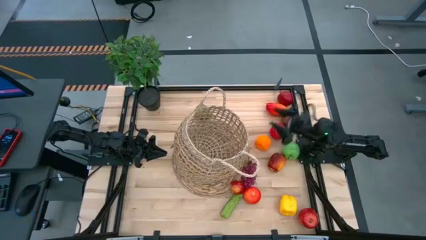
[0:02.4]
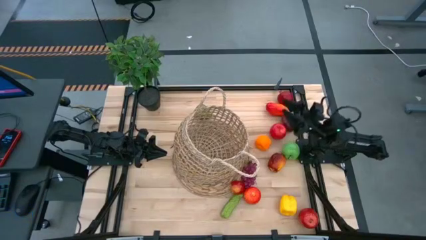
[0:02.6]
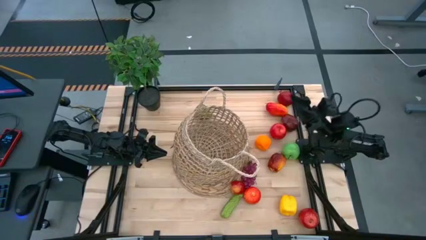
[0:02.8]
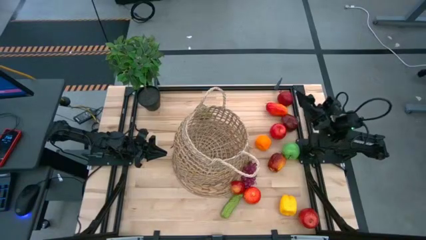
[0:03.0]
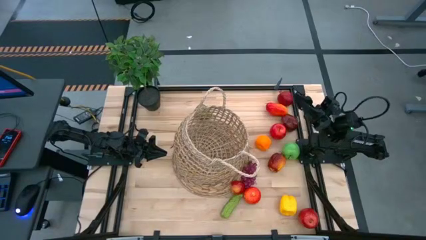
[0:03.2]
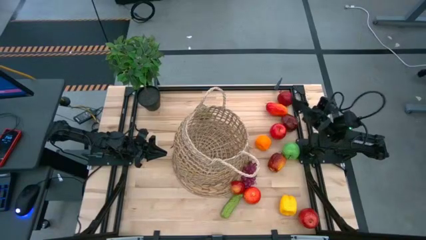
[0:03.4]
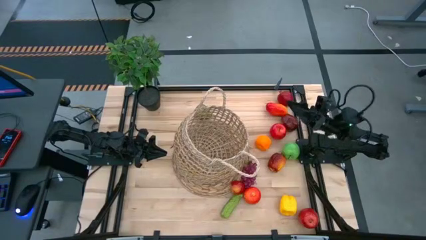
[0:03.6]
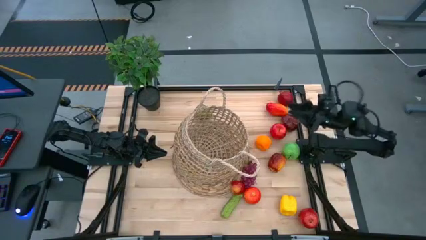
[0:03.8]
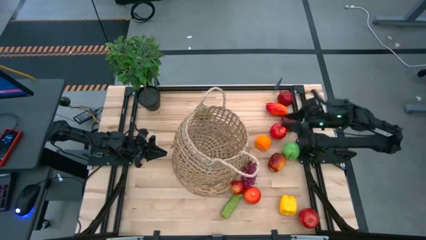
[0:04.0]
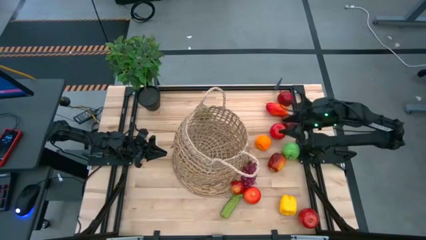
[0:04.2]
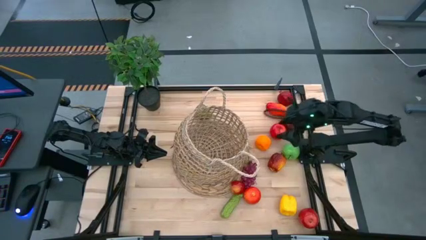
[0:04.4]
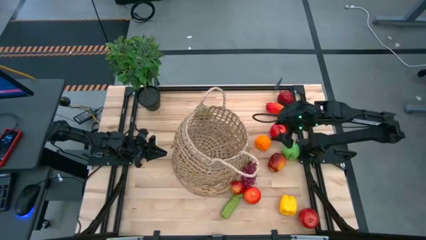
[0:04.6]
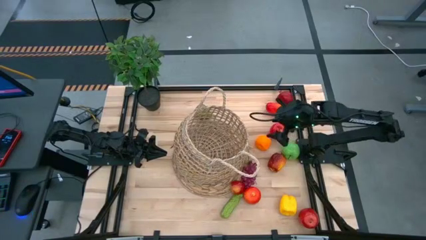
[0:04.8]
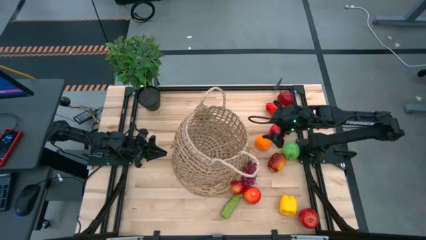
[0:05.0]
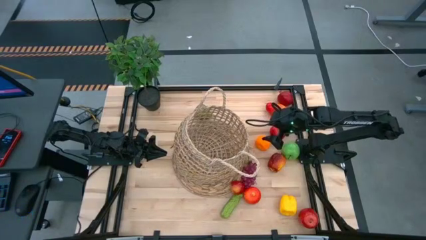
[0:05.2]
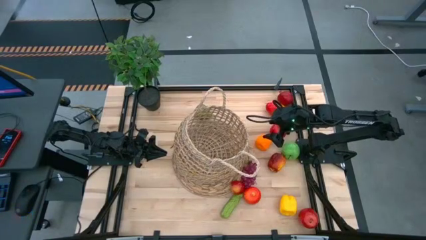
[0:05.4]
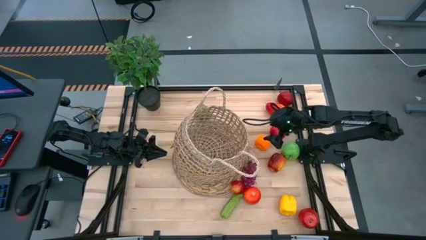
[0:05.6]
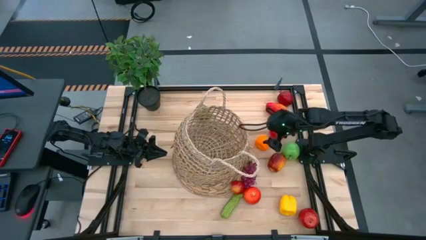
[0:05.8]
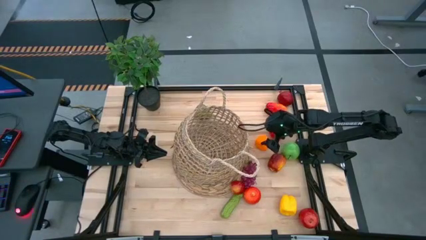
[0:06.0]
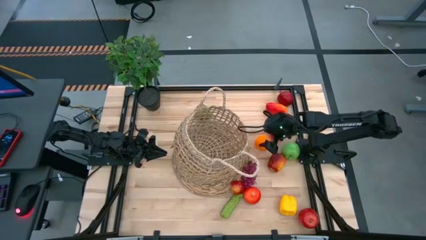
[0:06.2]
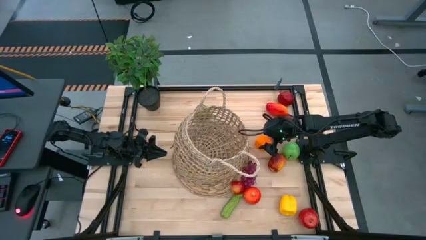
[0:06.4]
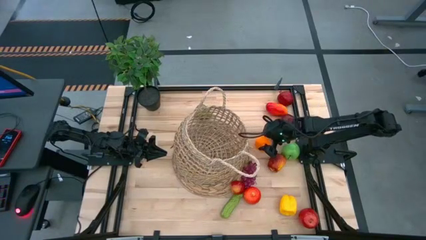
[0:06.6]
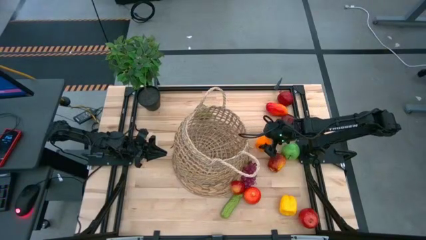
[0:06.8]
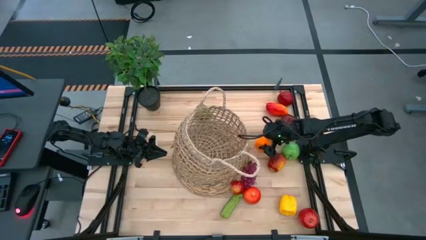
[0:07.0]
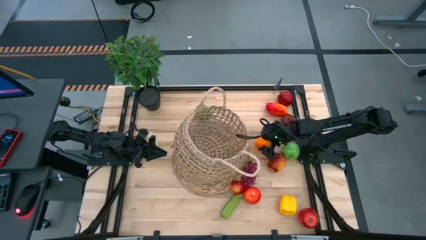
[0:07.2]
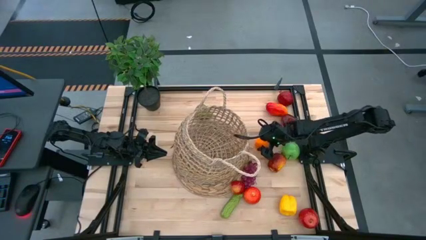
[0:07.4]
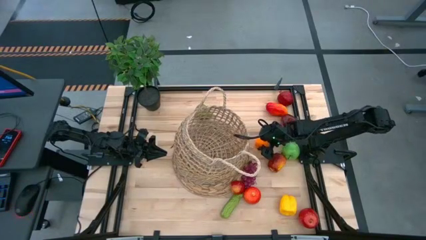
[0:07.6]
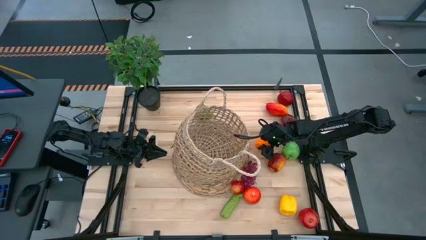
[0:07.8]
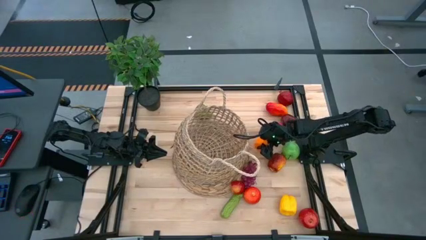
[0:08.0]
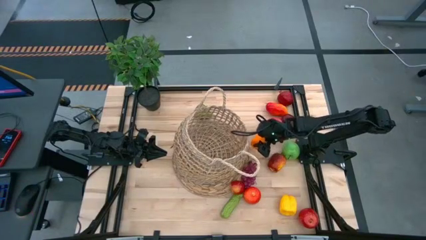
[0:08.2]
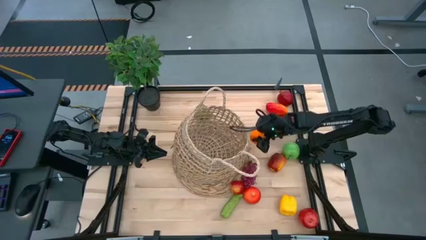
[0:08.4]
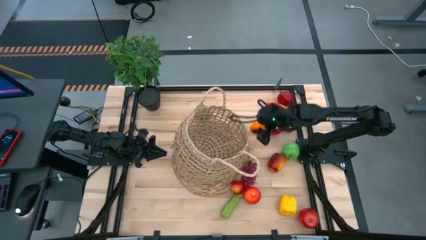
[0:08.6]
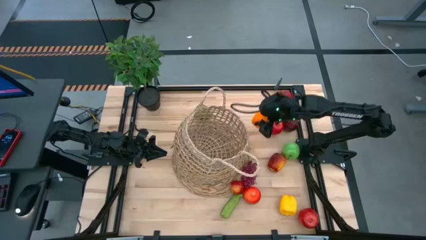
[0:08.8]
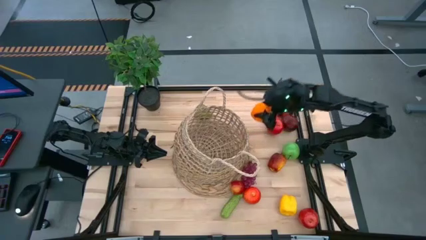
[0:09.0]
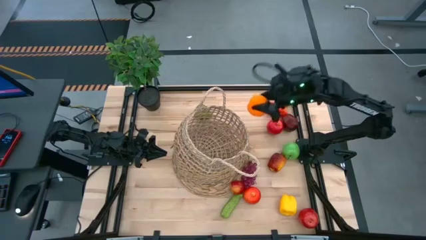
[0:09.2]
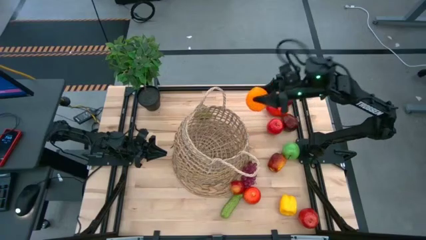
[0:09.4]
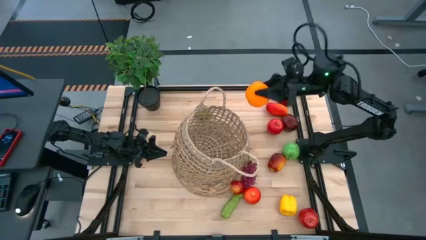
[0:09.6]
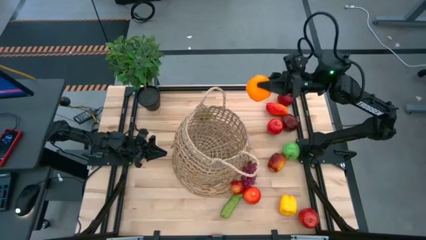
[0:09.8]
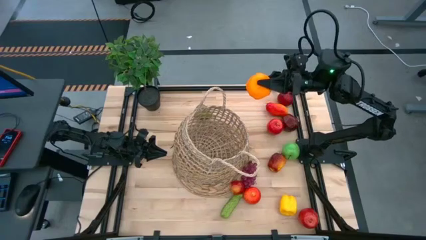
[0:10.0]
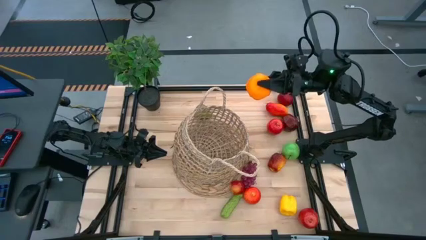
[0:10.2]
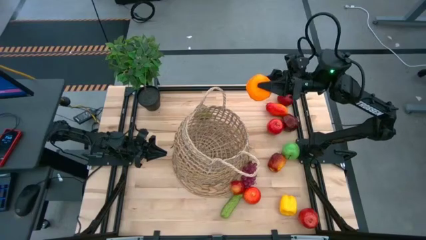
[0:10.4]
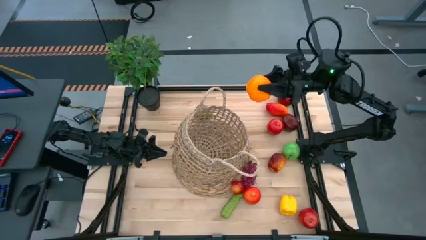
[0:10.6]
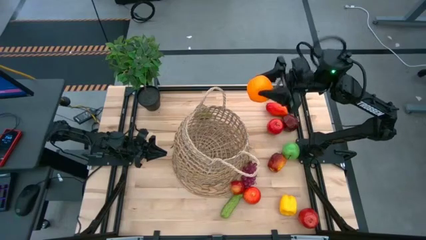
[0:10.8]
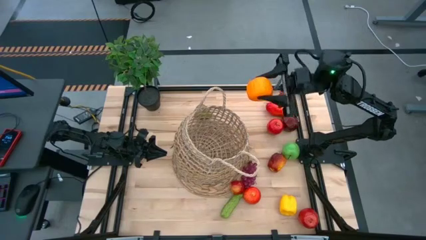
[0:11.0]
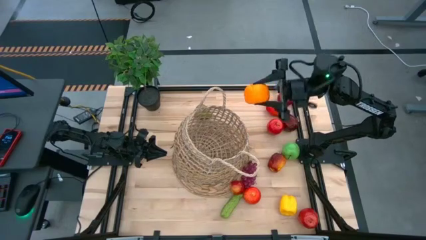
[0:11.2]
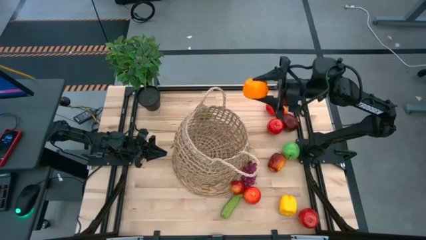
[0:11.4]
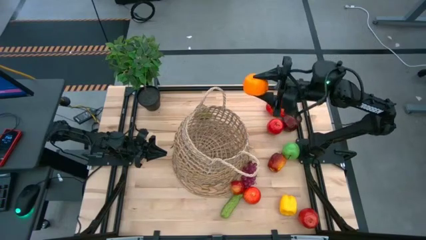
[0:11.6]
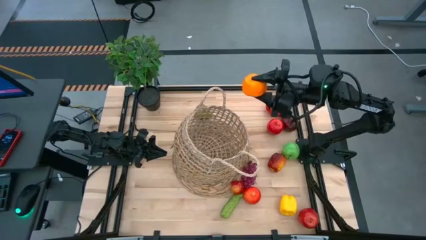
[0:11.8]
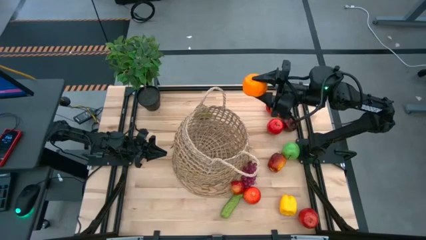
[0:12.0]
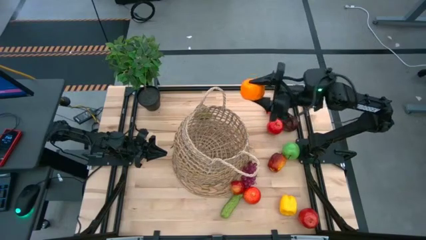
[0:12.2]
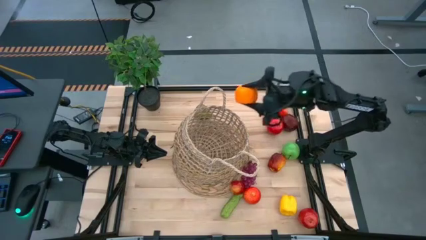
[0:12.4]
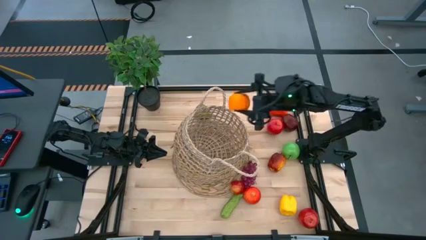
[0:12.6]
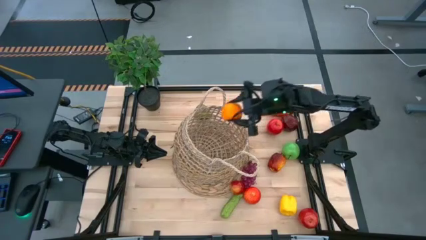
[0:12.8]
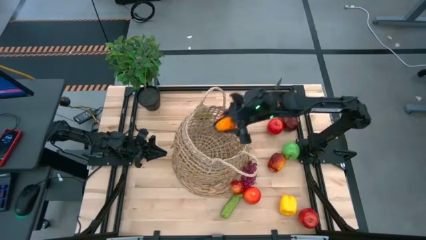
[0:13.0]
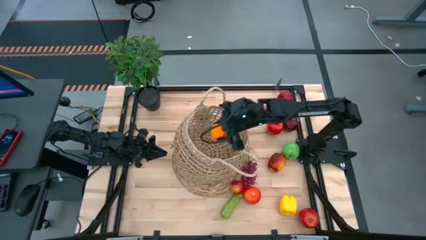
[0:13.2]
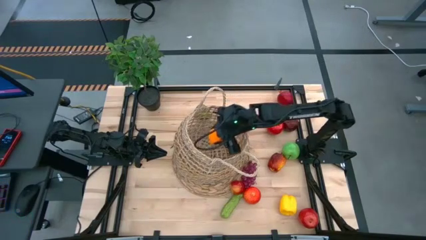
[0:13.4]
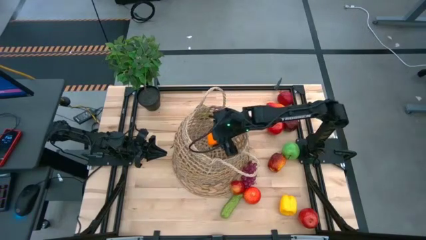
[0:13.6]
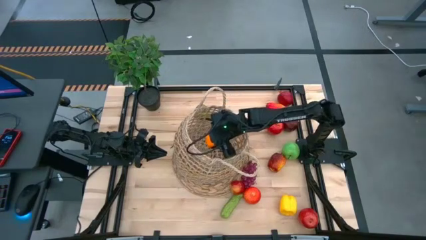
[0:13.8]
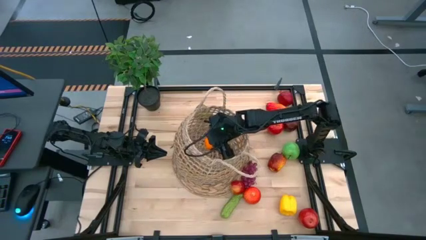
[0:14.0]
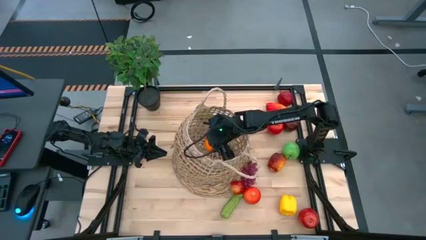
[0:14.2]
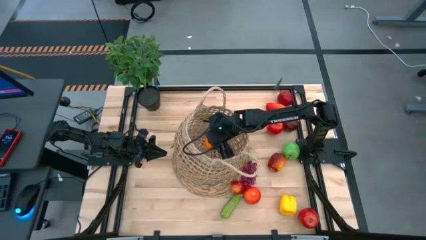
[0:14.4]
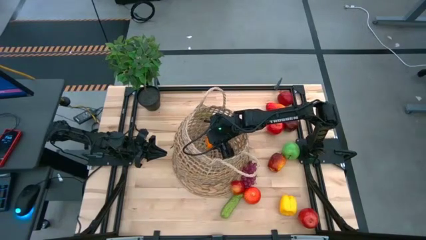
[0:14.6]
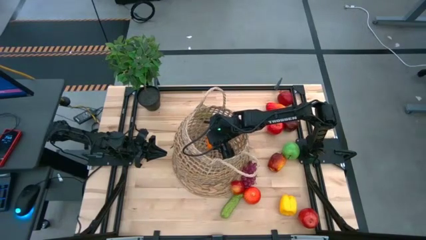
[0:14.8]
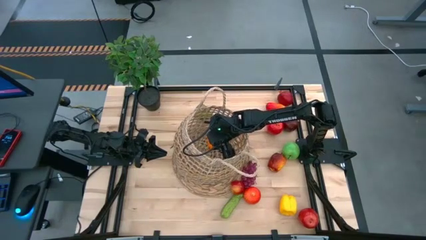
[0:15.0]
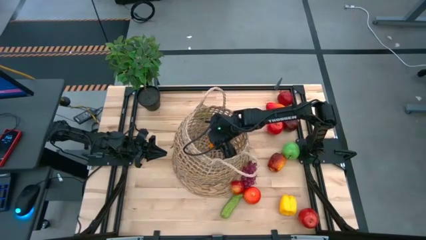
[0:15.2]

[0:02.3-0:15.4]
Task: Build produce basket
Put the orange into the brown basket
